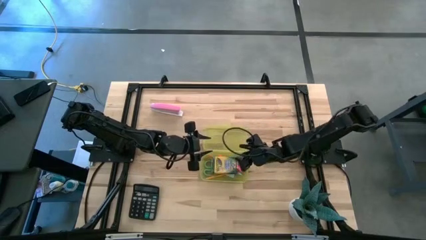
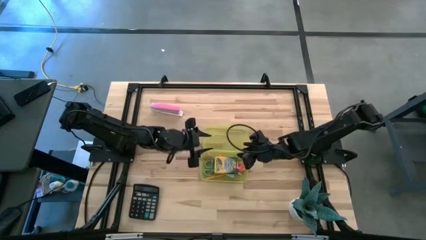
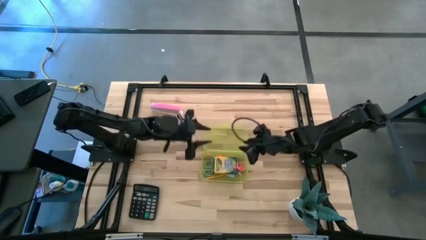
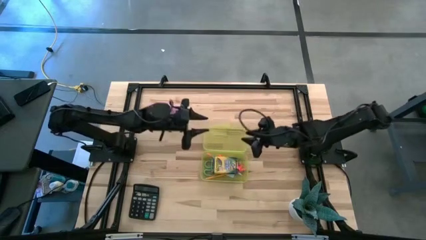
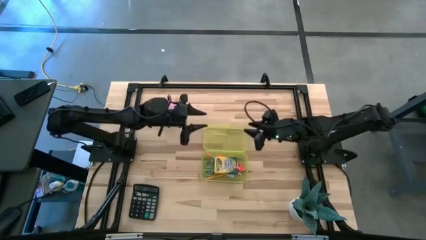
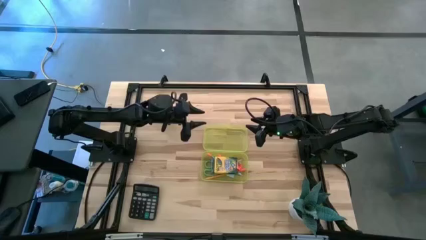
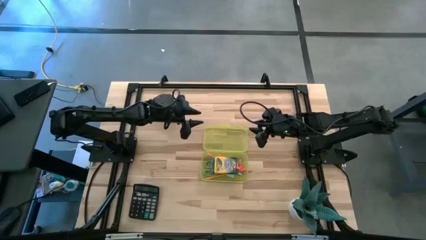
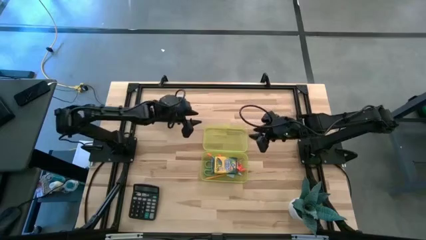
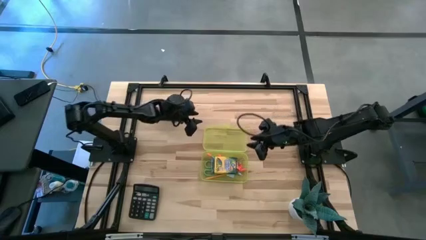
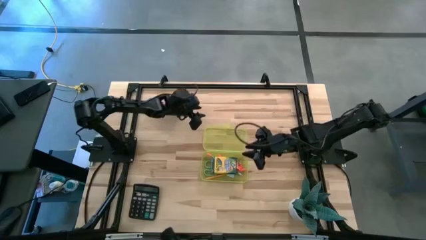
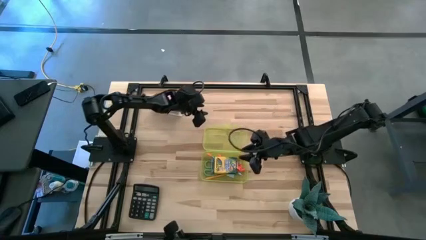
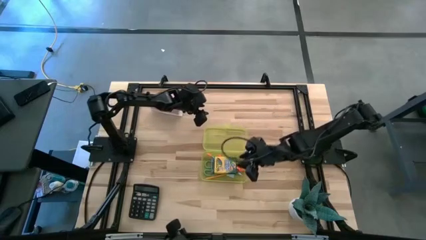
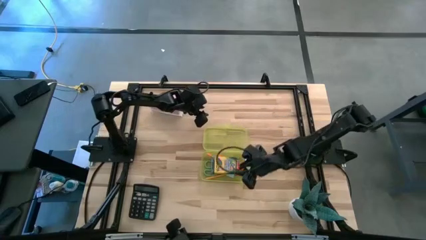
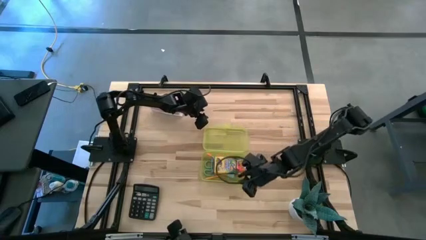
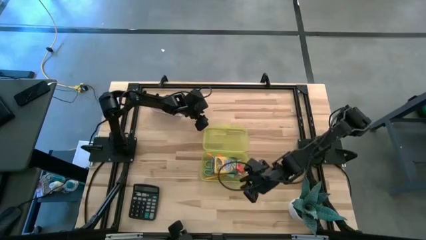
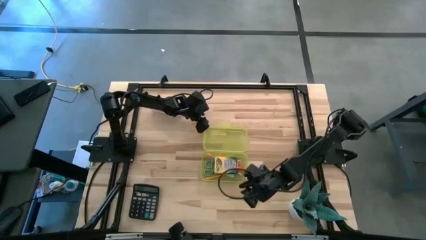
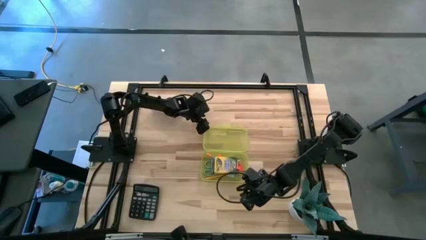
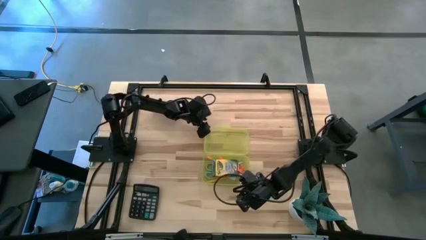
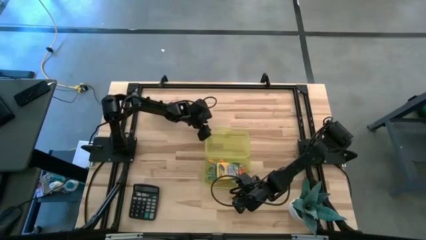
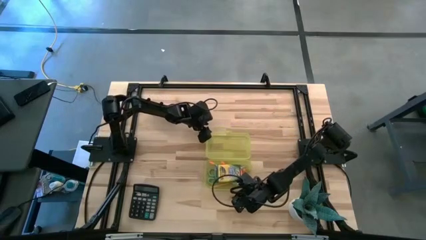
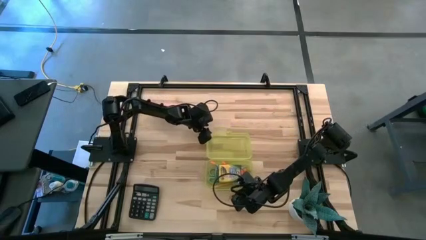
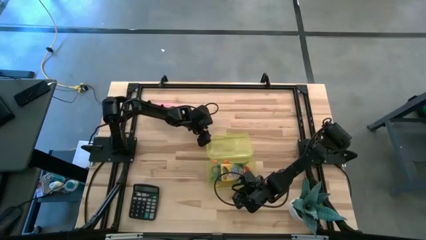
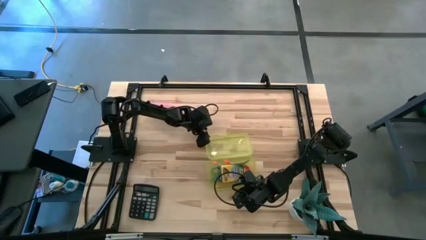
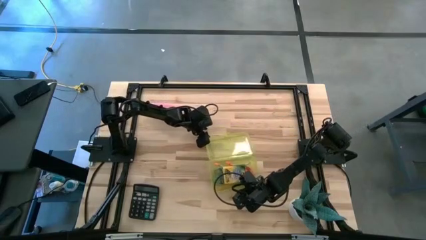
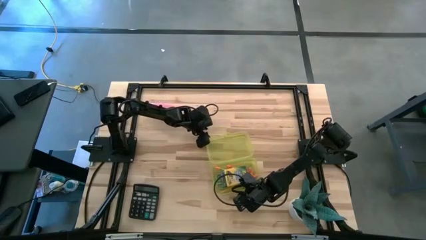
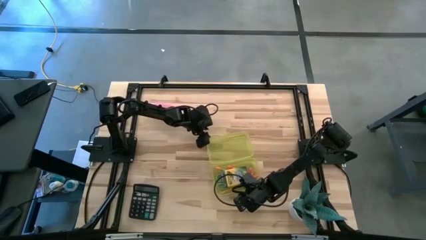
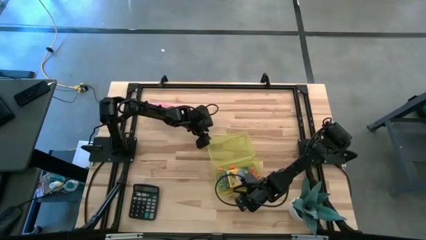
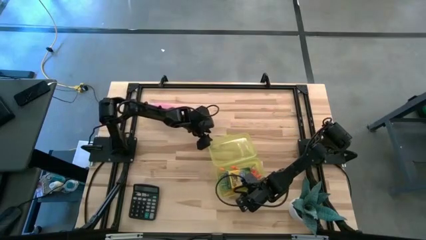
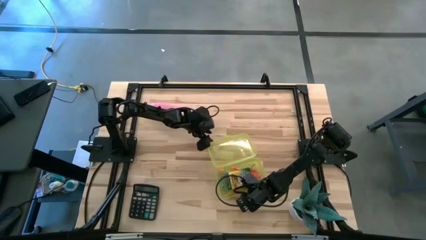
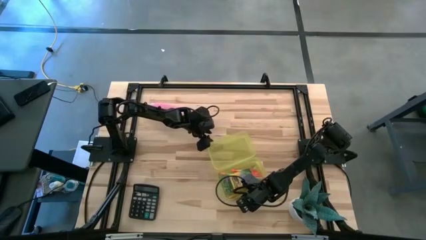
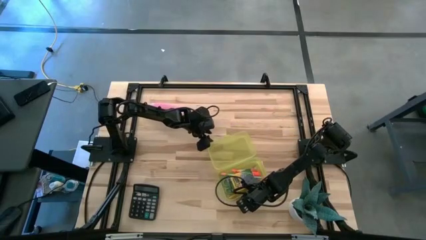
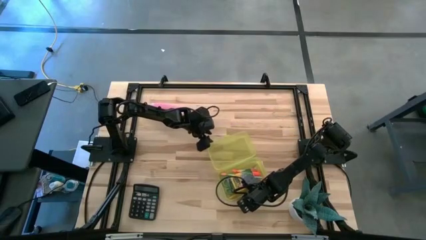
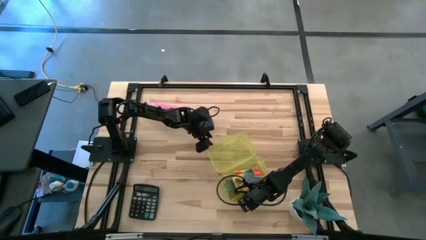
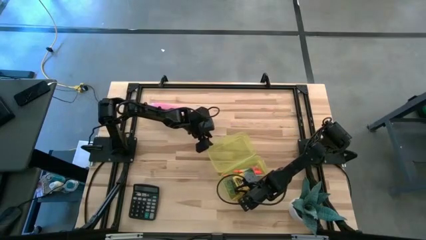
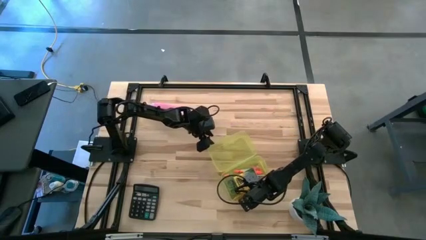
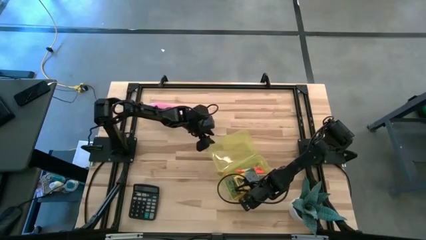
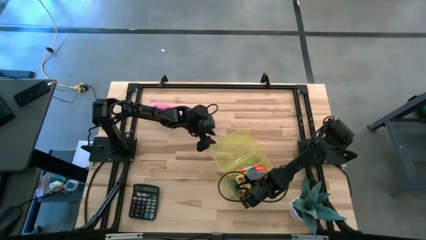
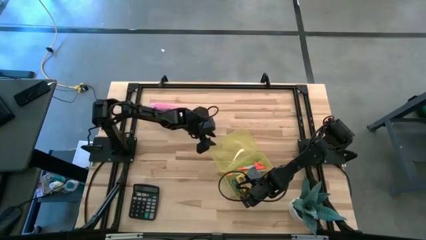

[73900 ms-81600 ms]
Task: Pack school essentials
Close the supply box

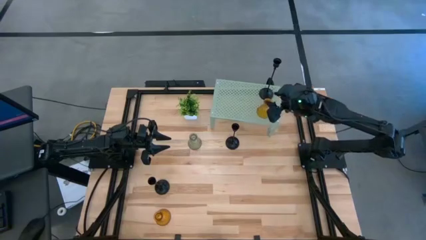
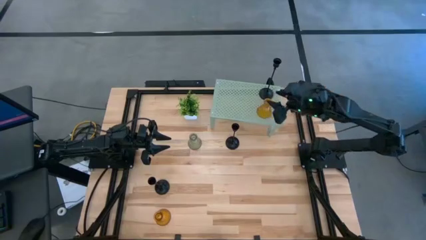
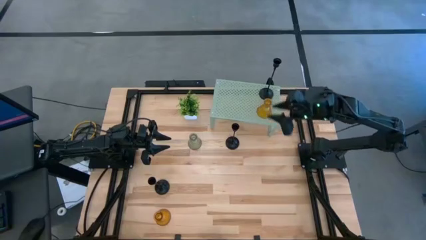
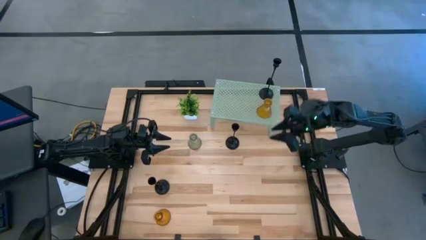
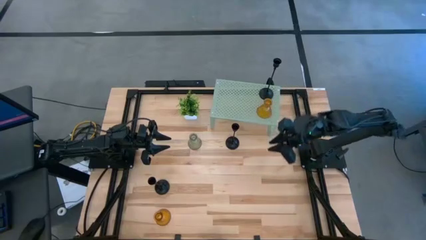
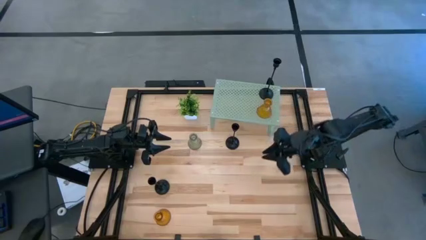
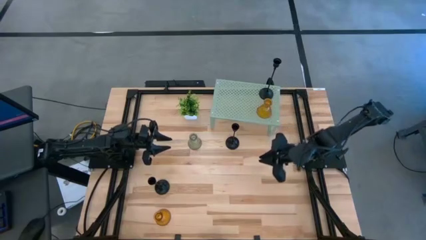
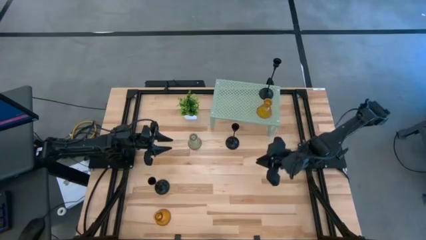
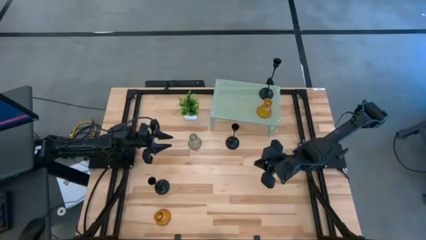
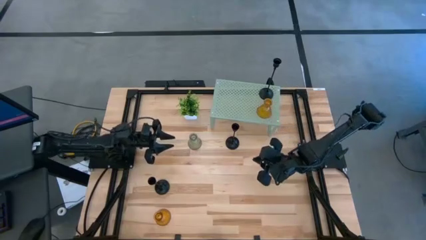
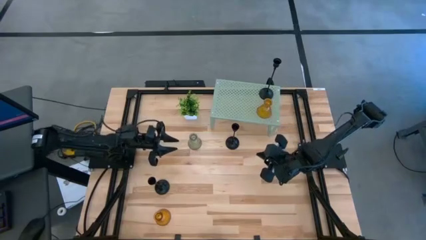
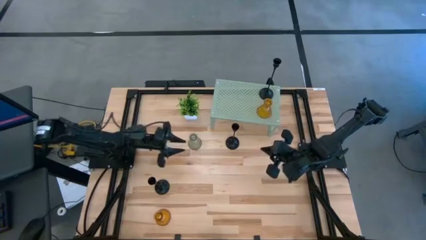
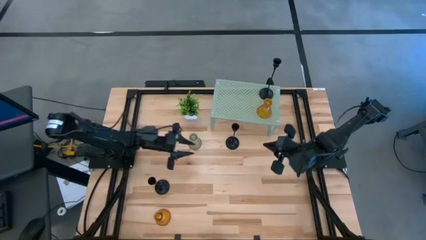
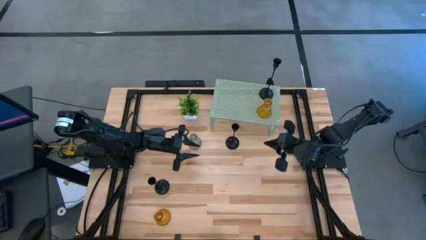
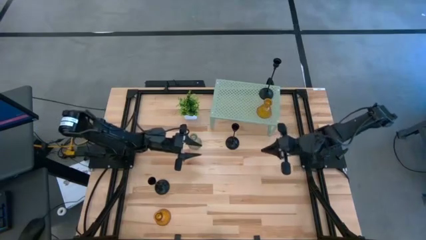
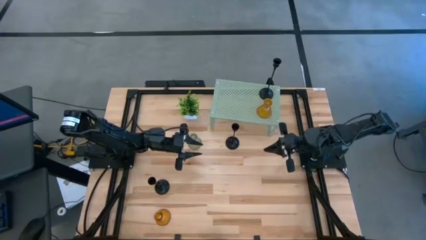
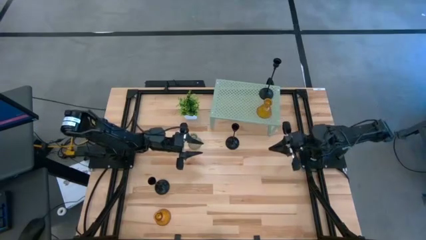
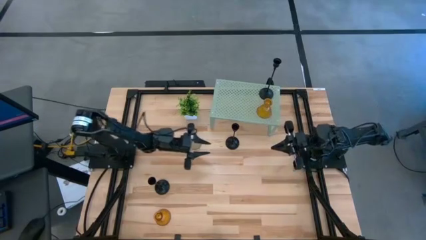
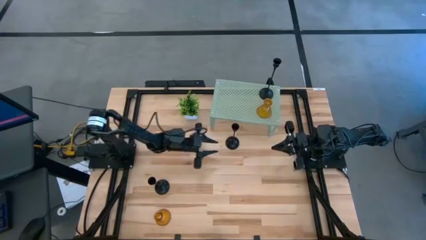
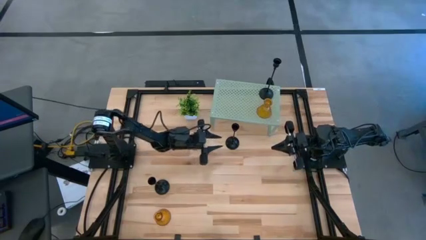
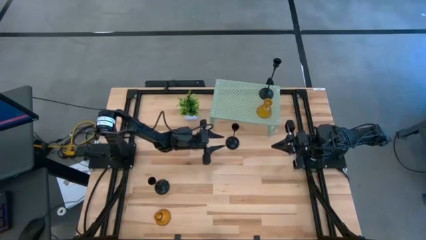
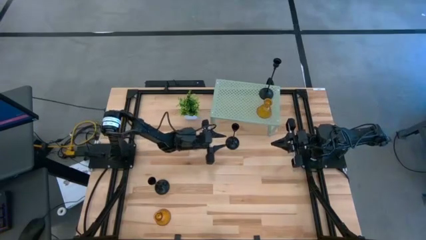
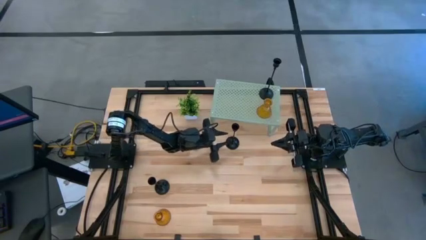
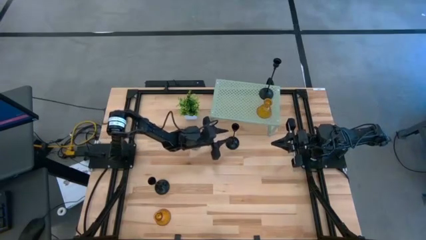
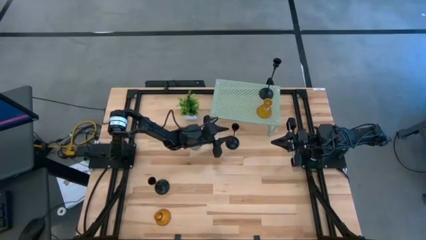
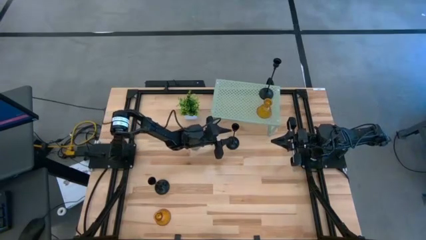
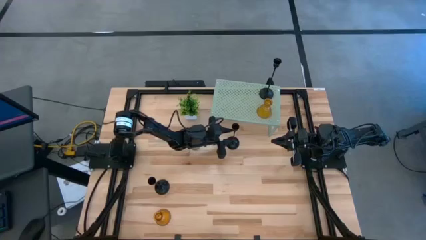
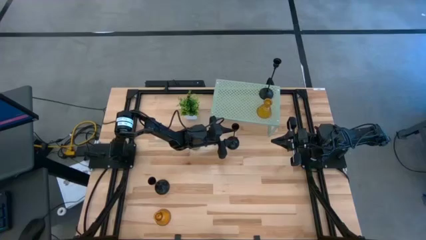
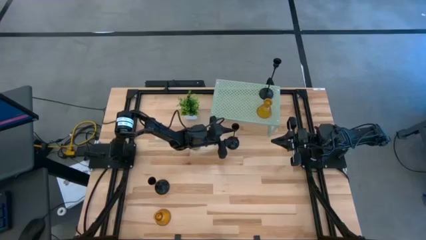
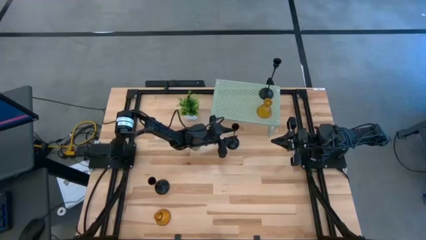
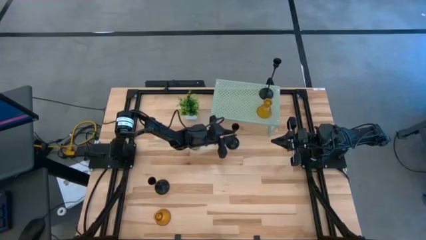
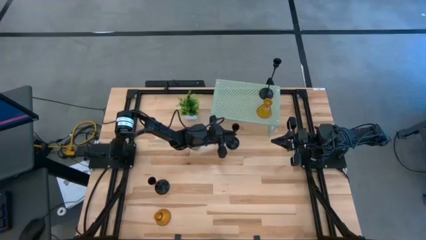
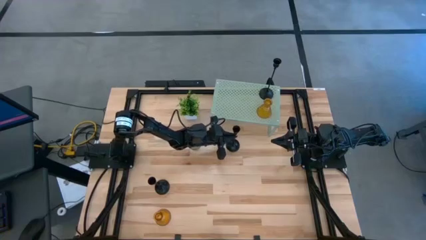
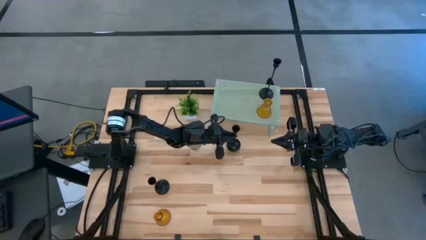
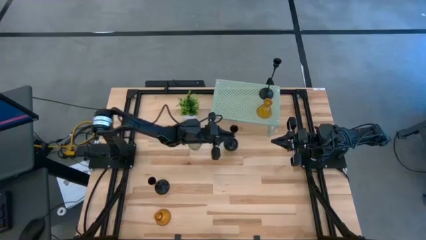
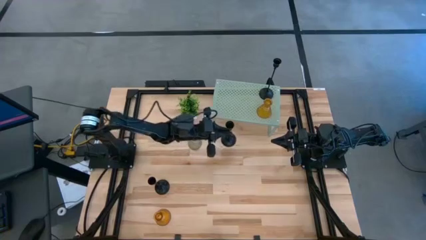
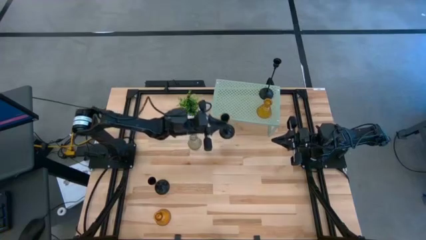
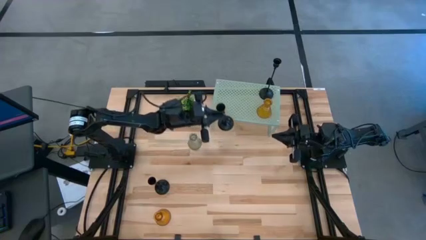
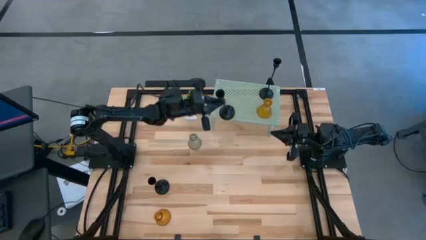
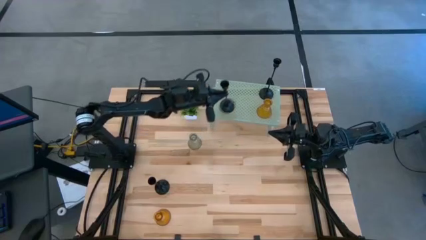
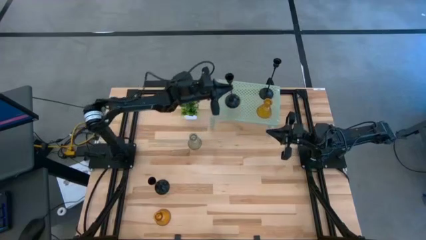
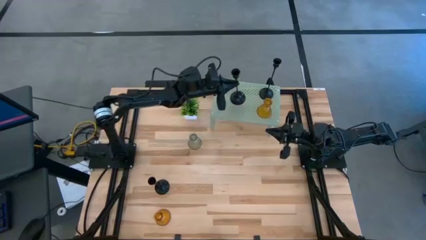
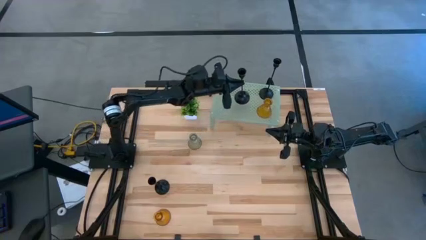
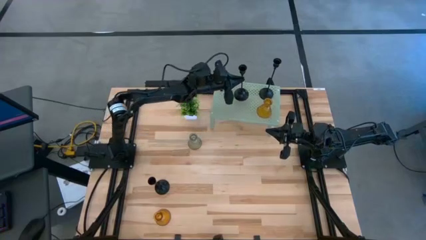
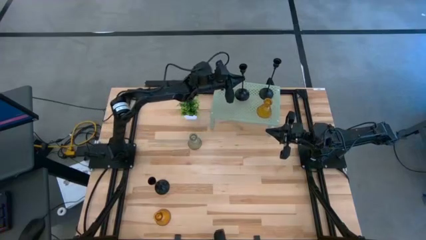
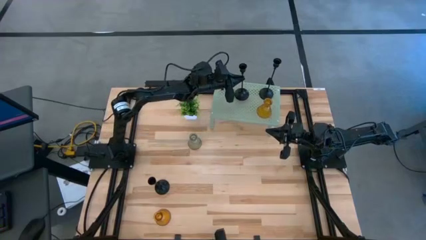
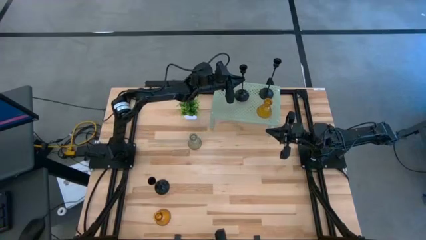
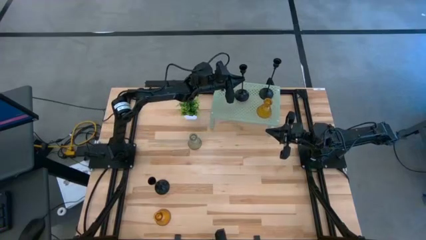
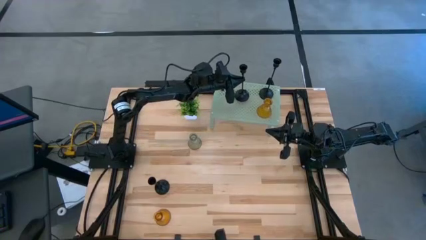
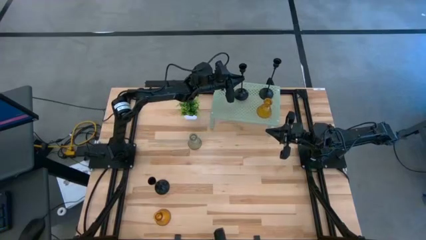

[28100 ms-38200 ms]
Task: Pick & Place candle stick holders
Put the top right black metal candle holder on the shelf
